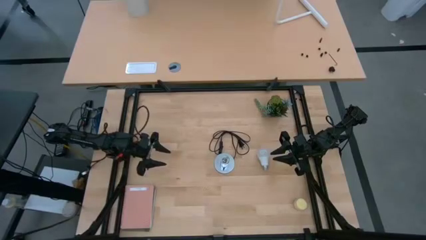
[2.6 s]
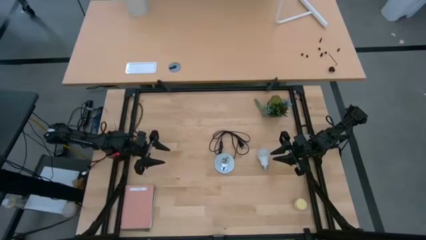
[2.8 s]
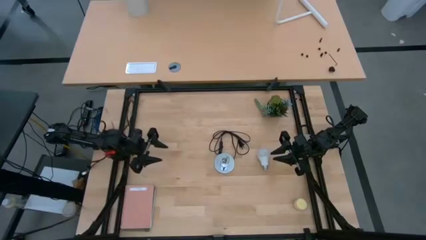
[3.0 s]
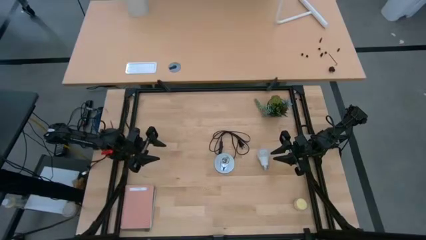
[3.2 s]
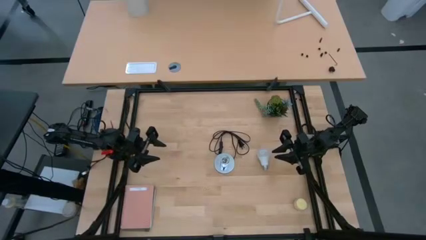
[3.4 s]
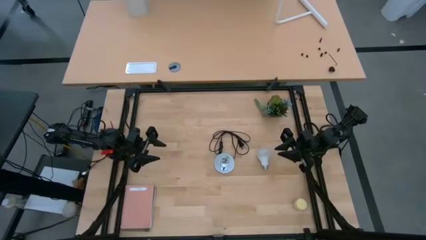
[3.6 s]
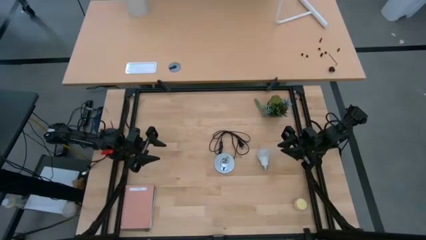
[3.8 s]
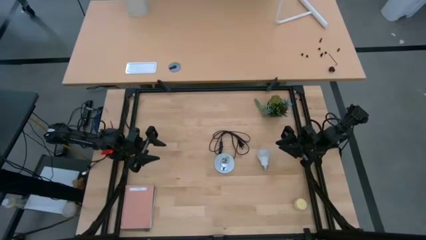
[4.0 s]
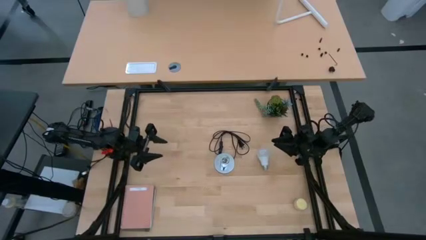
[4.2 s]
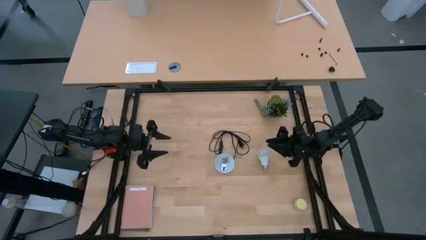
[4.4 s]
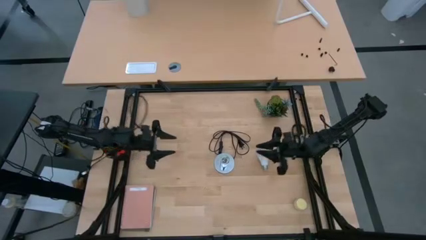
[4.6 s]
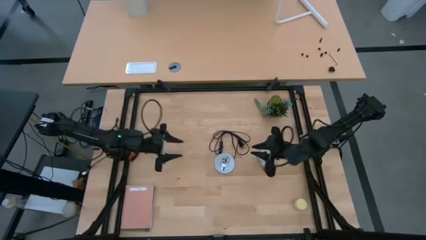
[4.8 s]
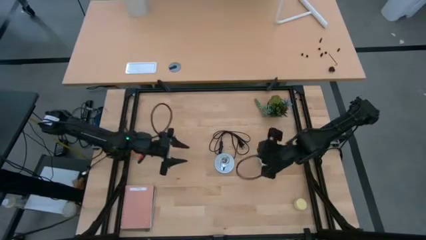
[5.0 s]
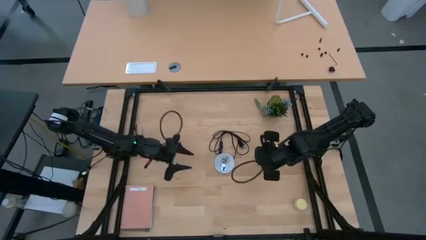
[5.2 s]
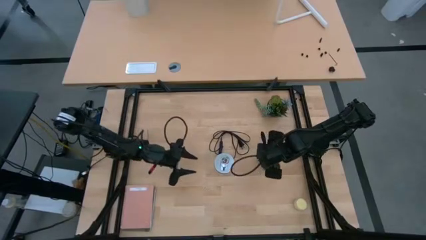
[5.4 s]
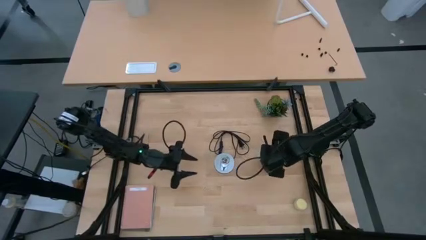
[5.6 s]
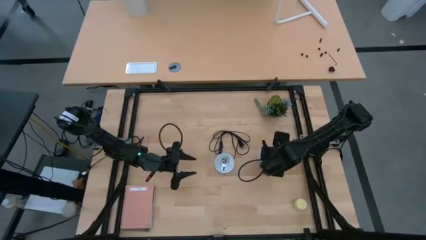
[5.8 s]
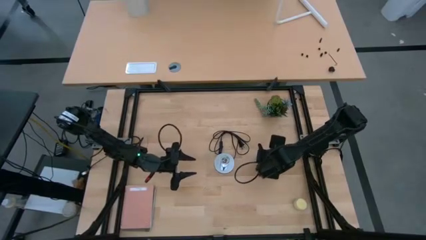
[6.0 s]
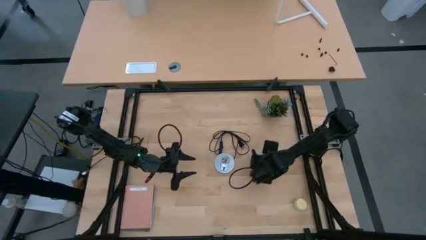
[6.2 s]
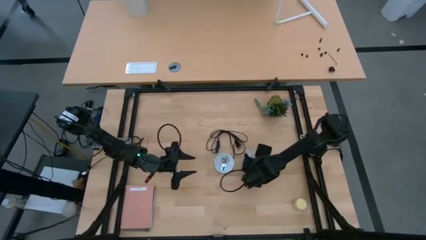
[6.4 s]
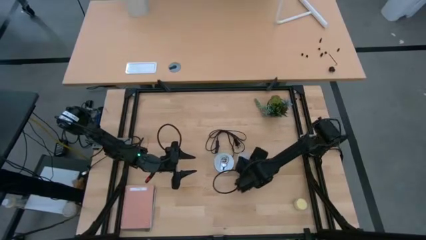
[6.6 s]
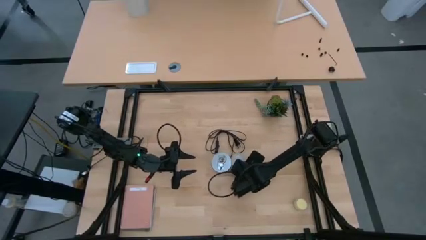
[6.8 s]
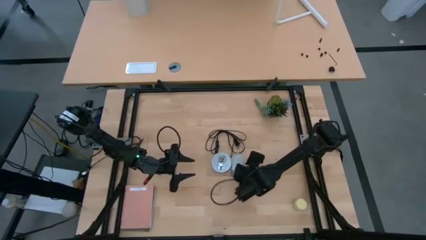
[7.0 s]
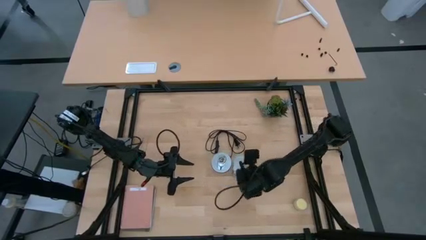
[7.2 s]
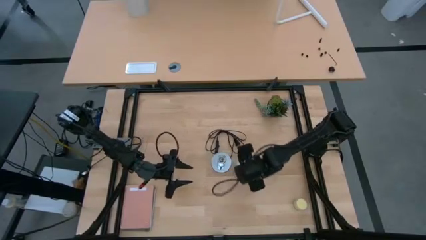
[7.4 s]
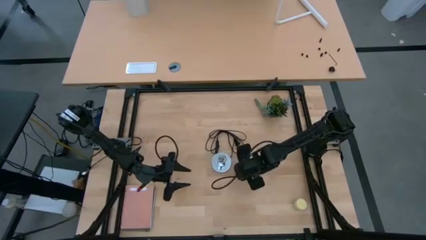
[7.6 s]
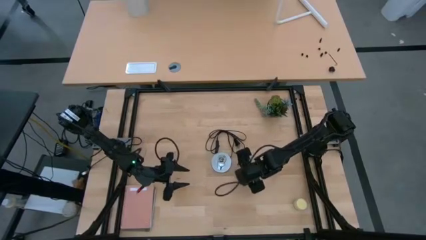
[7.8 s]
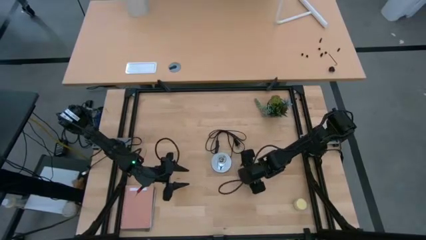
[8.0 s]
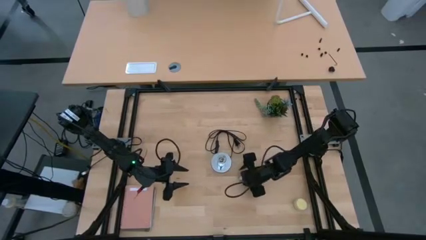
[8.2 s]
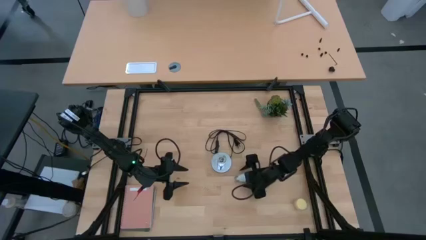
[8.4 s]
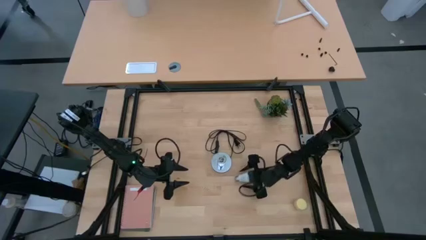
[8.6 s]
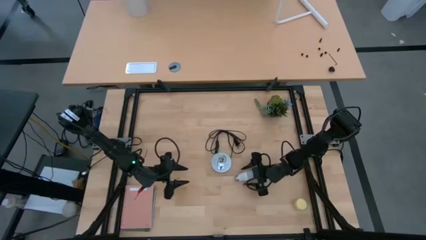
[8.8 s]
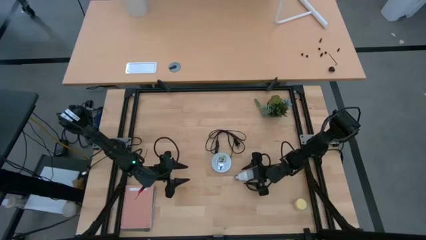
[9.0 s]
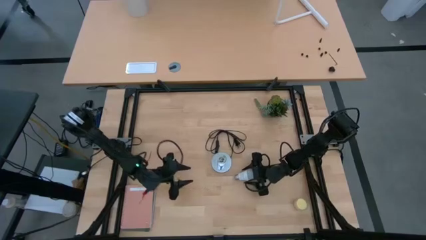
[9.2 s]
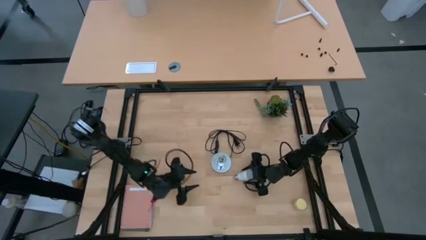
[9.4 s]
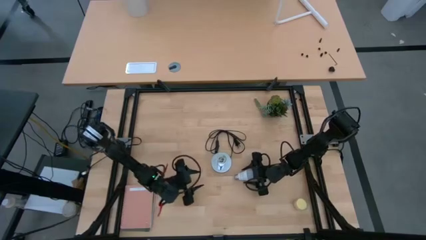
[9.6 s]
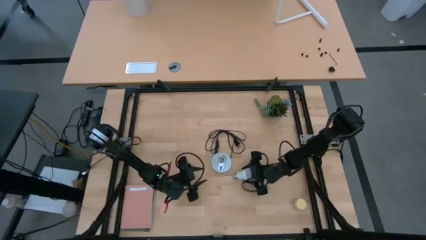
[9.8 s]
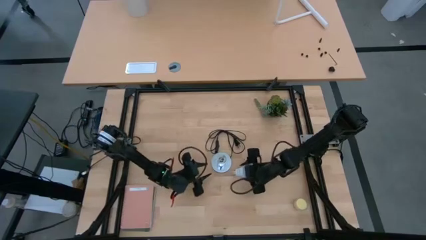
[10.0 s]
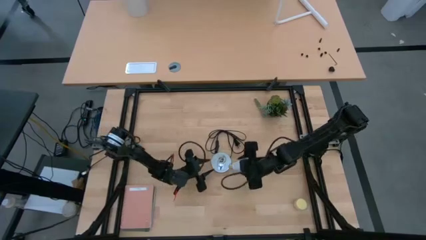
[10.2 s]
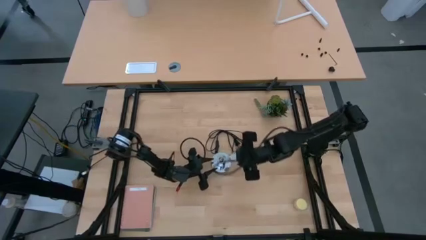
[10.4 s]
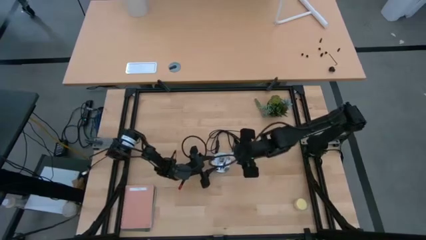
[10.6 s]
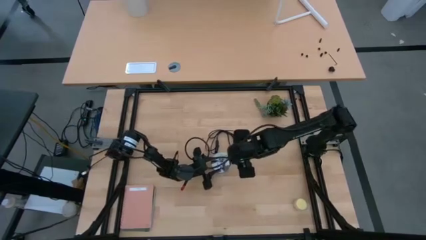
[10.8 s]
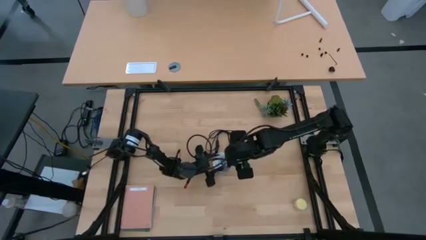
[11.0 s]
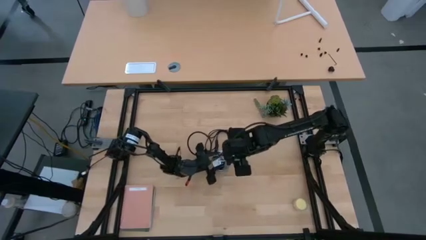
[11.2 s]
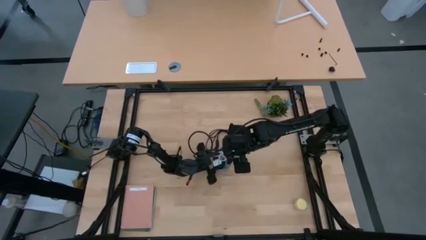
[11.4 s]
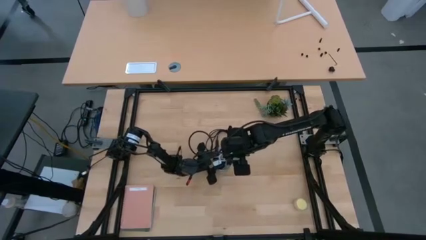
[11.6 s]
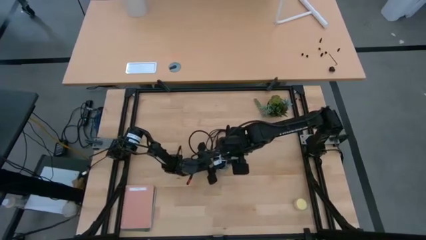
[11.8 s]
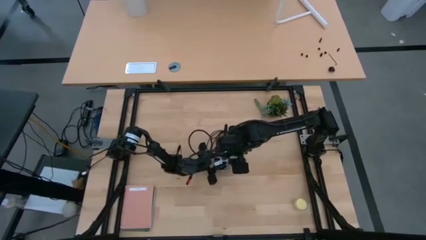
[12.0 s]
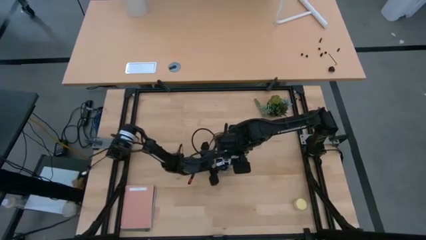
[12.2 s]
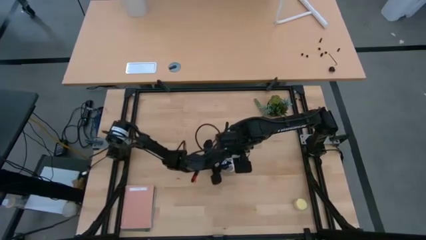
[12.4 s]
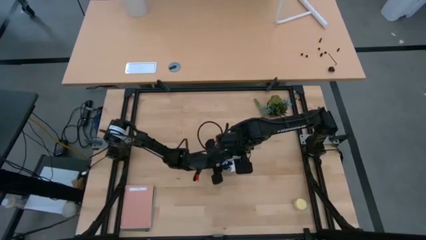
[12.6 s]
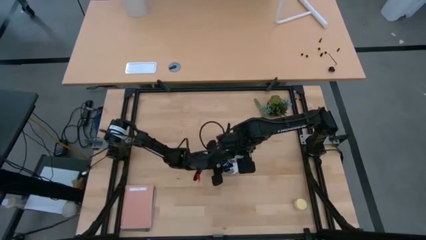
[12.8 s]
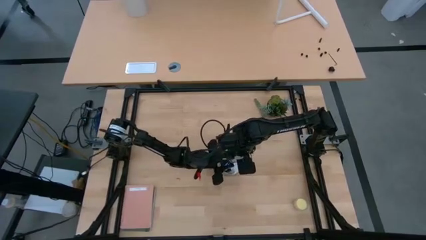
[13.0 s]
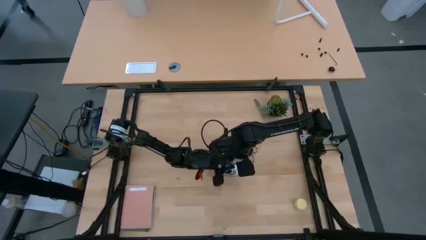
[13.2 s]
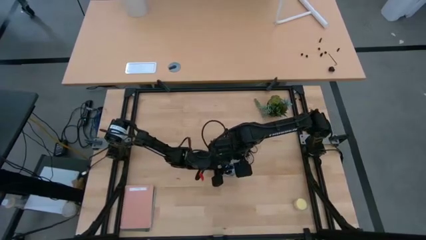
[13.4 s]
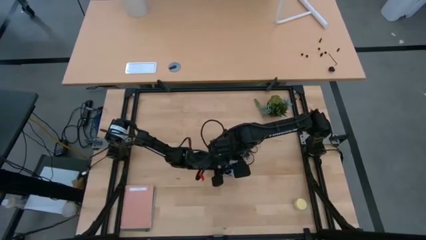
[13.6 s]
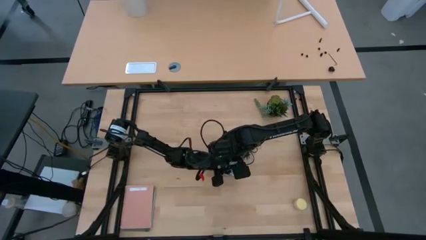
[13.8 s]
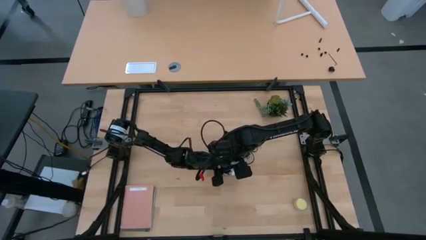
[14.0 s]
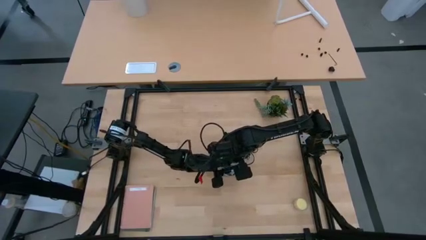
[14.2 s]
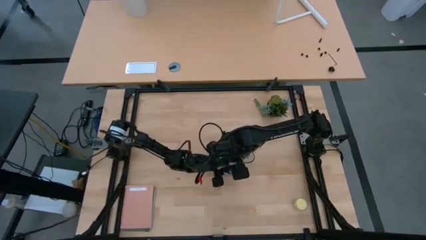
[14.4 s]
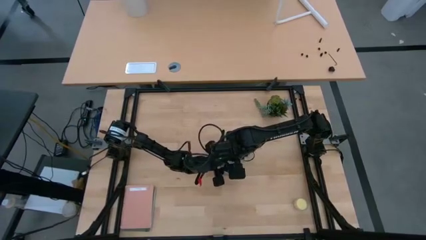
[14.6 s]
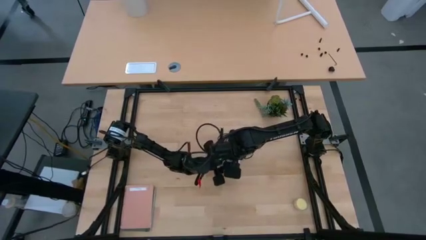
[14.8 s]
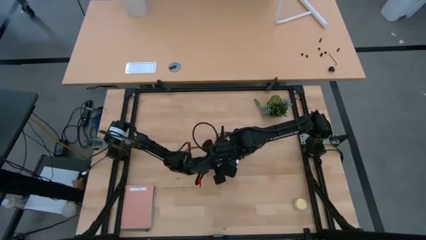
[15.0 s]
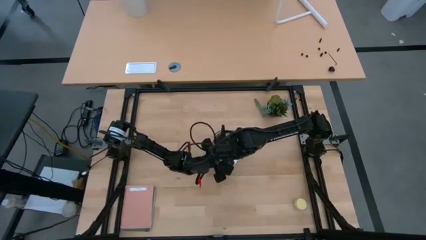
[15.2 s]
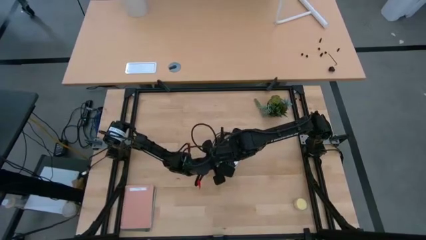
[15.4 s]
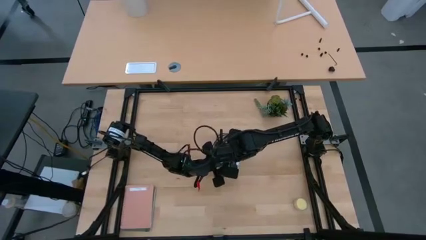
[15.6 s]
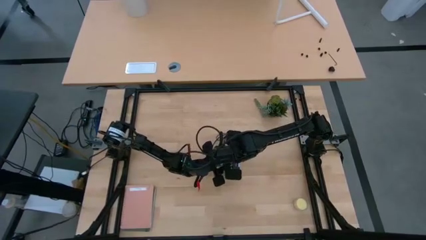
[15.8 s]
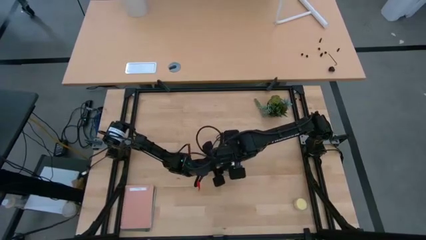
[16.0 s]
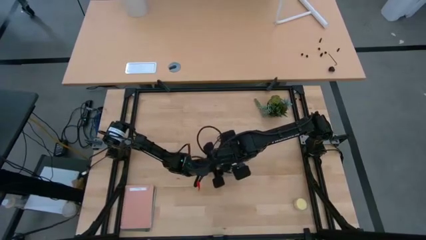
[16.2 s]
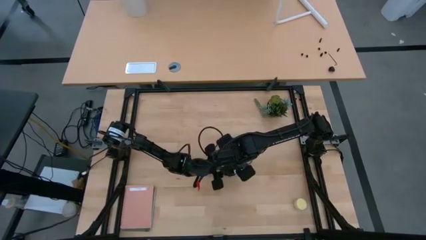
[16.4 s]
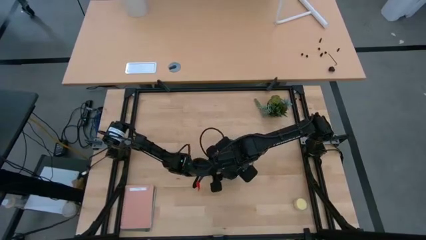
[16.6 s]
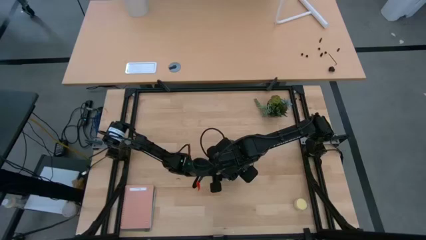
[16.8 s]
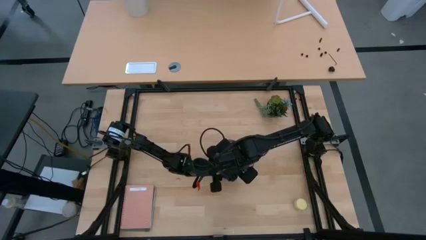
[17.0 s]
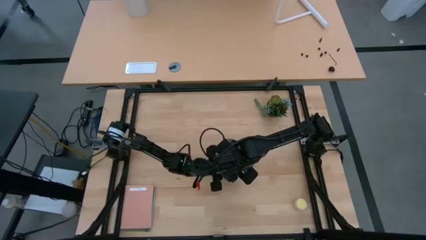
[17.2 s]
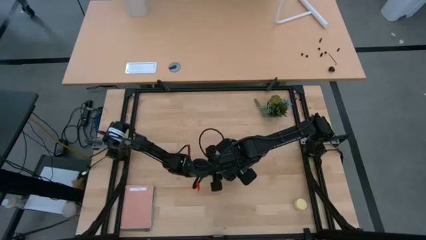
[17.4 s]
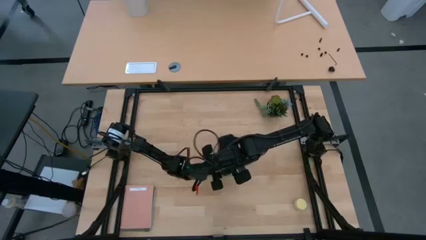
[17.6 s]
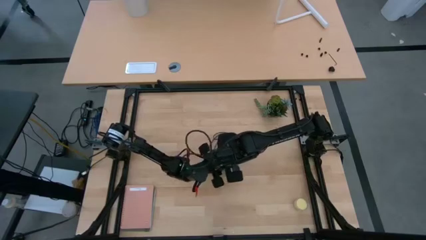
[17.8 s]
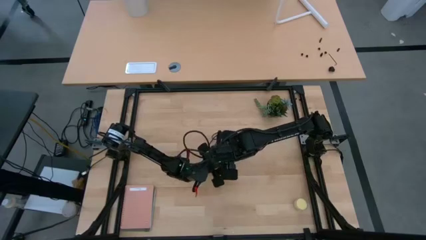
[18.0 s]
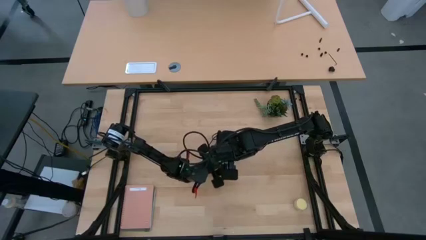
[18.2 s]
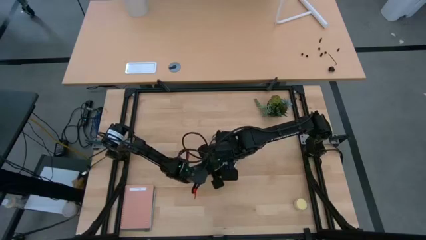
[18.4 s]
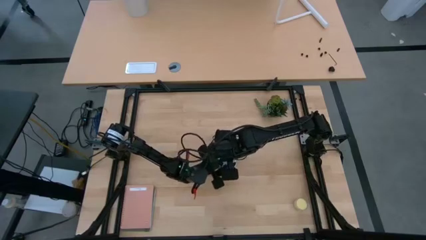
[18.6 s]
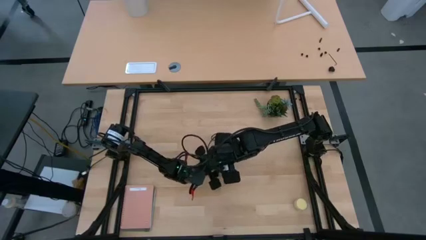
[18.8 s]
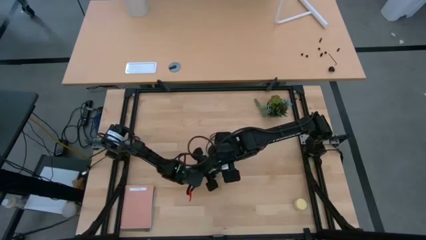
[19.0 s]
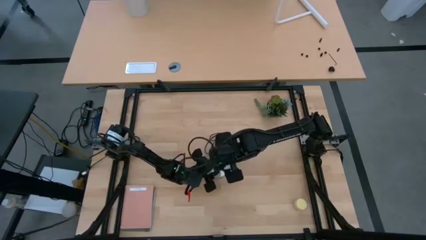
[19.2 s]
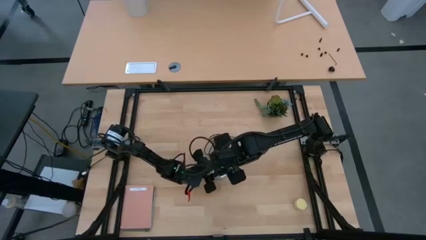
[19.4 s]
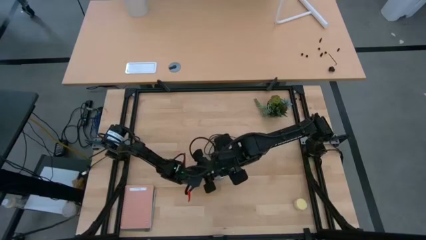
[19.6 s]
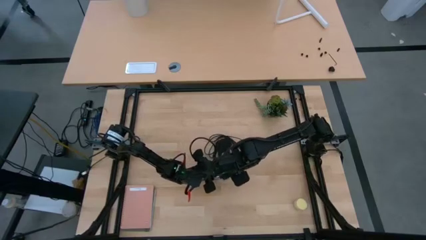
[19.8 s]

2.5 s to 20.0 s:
Task: Screw lightbulb
Insert the lightbulb into the silver lamp
